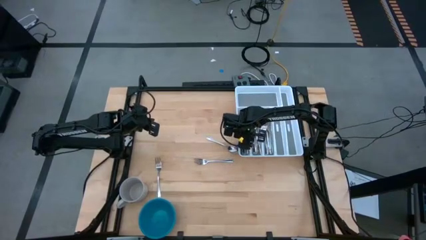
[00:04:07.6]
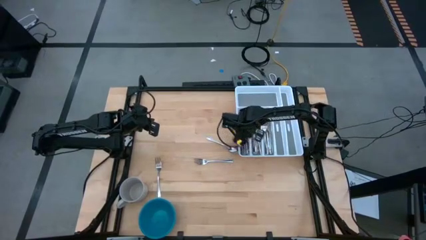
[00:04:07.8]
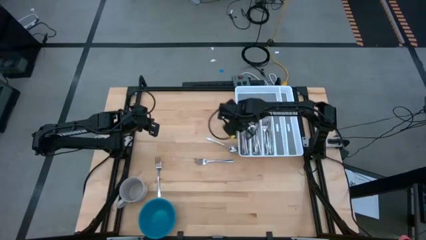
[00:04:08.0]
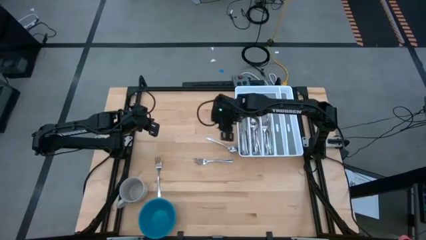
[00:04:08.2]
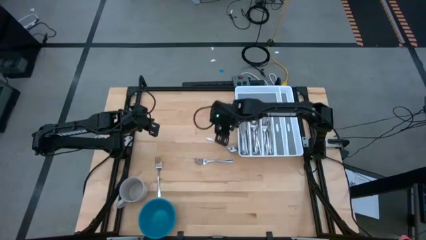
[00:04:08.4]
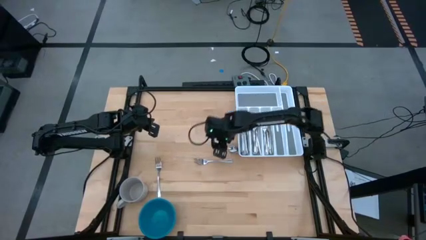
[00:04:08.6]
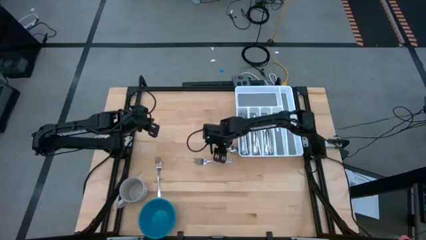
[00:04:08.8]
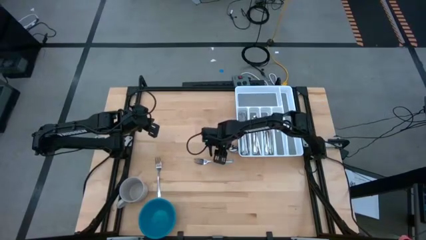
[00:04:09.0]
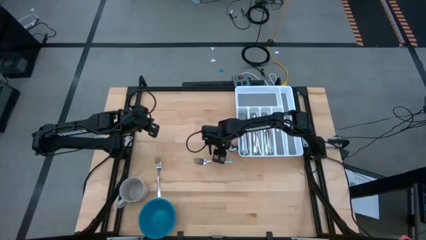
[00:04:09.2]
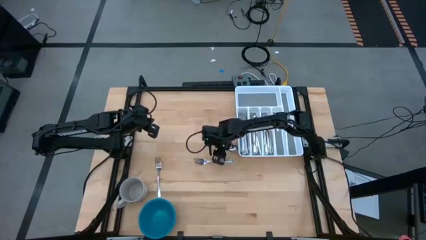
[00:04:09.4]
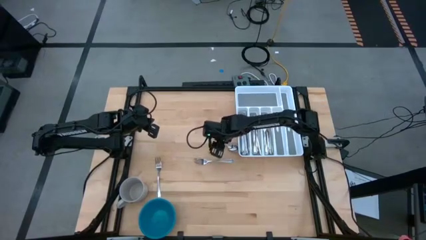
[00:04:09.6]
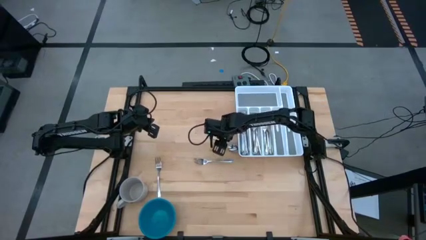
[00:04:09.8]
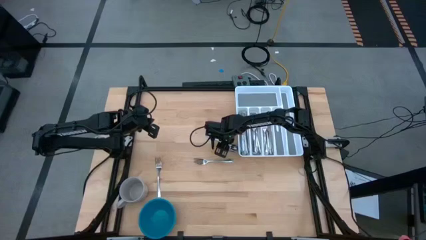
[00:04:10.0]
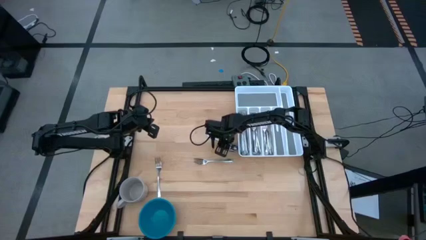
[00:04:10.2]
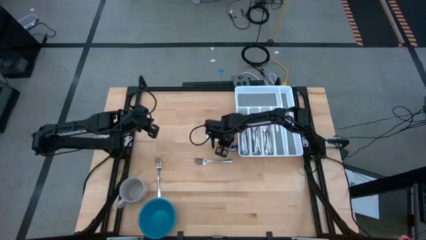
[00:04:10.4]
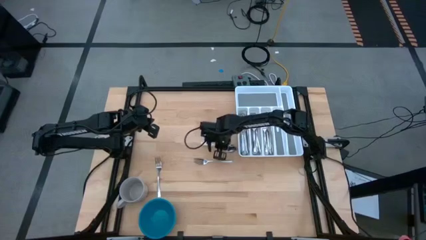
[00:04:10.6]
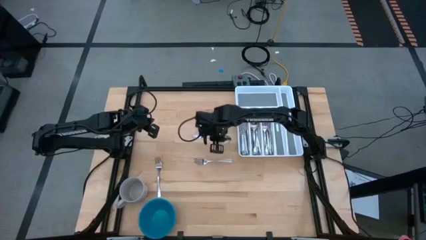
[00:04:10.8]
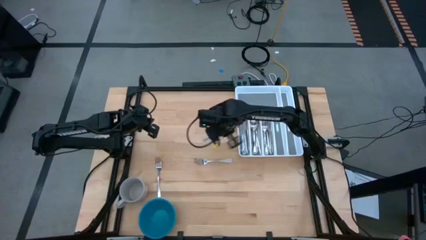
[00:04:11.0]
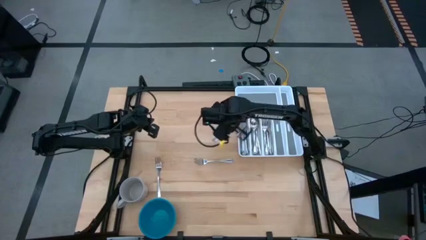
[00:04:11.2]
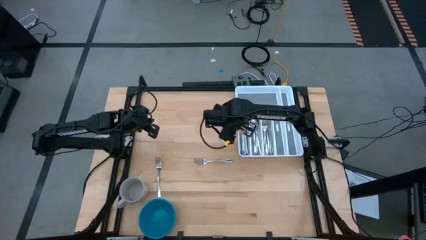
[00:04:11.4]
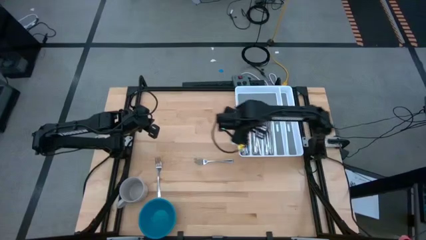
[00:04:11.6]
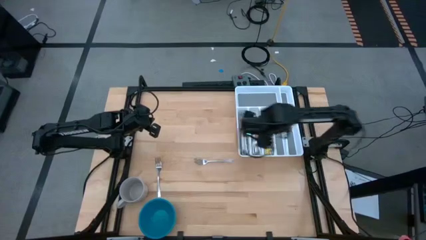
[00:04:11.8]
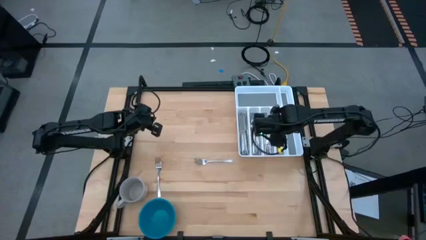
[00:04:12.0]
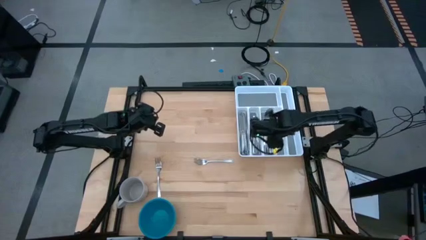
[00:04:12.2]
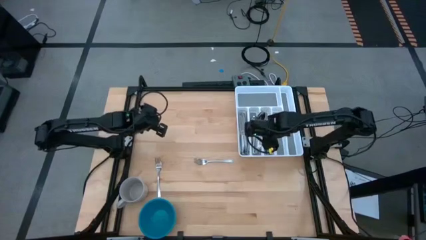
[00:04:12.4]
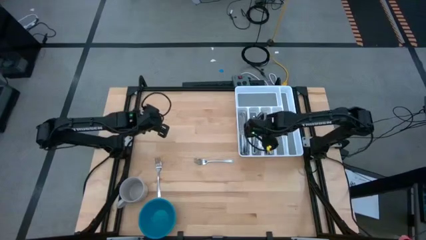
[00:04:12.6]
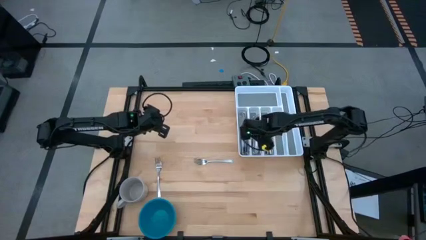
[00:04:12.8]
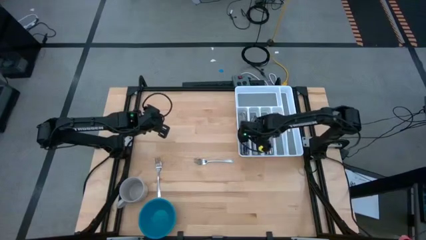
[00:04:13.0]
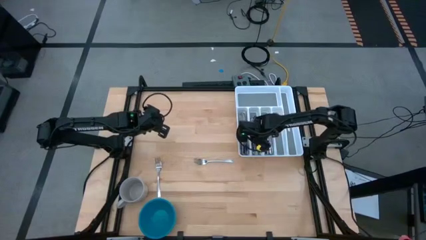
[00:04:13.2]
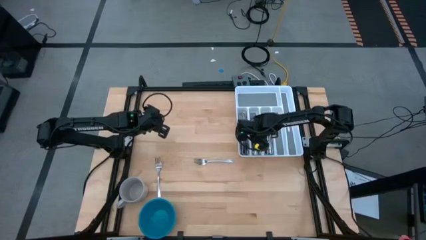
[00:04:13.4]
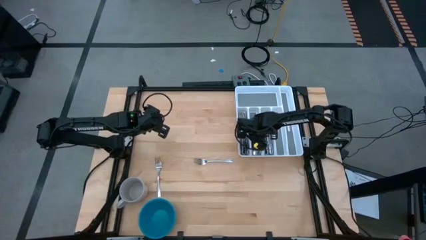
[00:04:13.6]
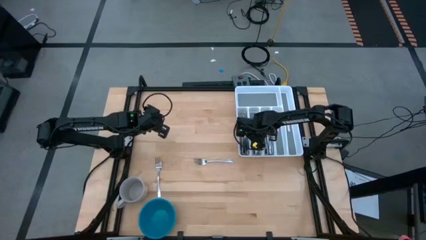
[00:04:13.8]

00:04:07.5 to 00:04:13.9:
Task: Sort silverware
Put the spoon into the silverware tray

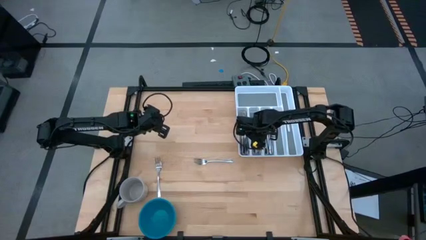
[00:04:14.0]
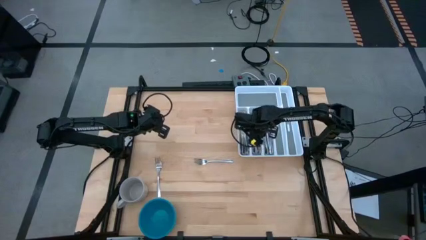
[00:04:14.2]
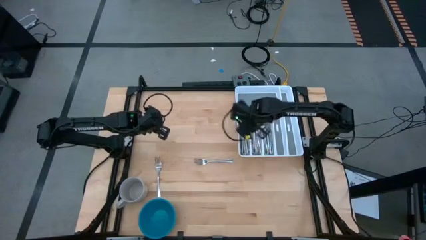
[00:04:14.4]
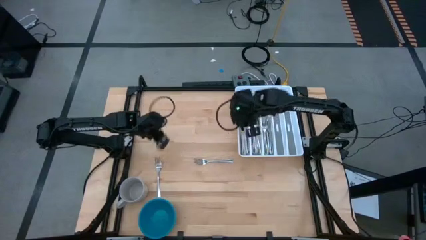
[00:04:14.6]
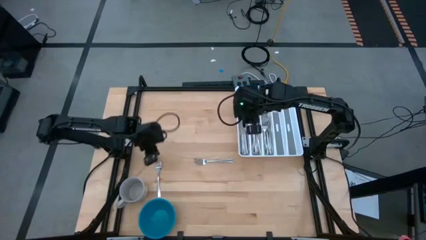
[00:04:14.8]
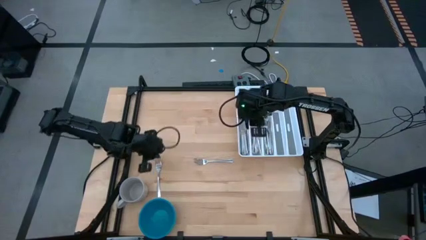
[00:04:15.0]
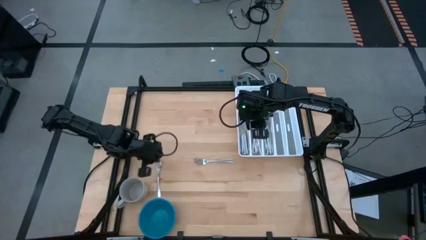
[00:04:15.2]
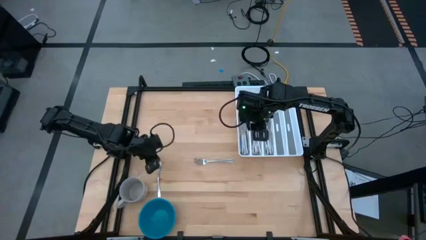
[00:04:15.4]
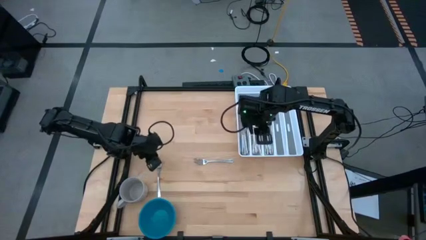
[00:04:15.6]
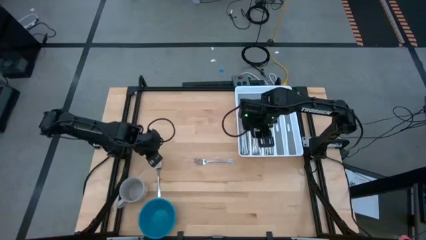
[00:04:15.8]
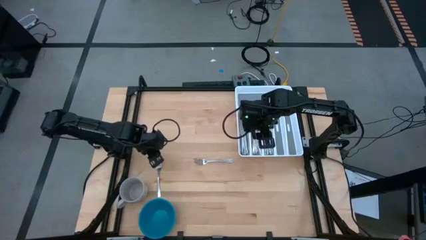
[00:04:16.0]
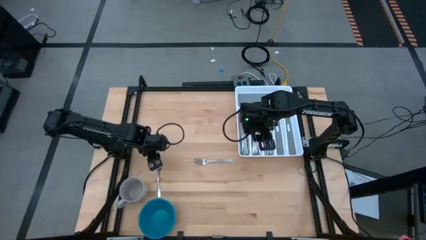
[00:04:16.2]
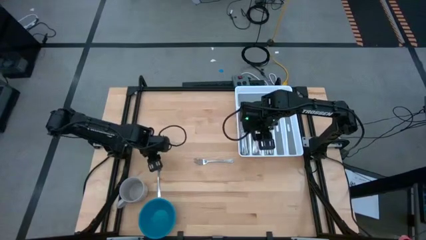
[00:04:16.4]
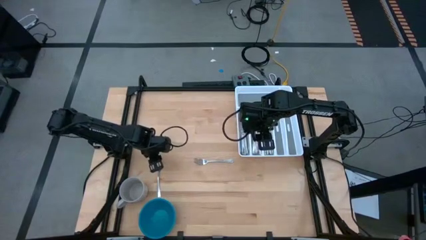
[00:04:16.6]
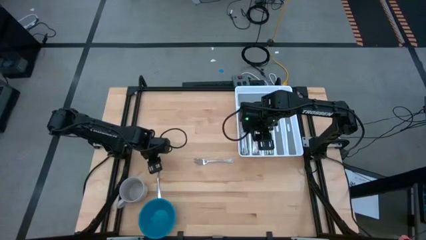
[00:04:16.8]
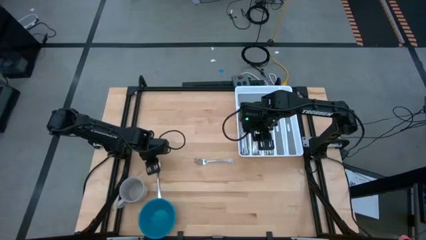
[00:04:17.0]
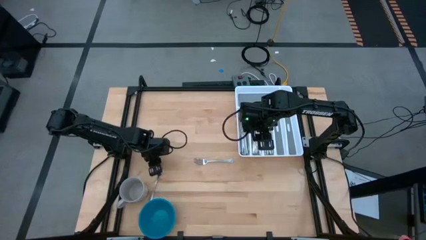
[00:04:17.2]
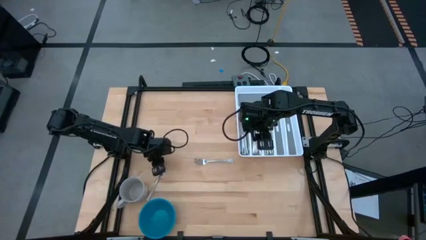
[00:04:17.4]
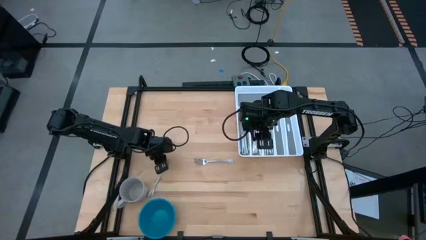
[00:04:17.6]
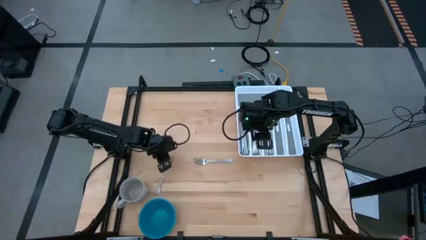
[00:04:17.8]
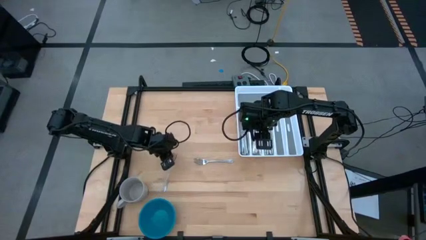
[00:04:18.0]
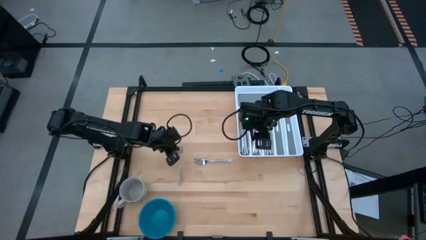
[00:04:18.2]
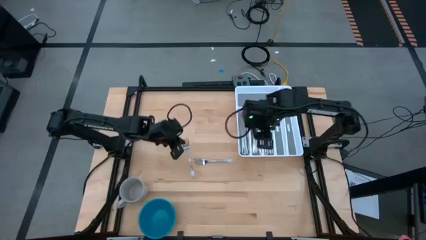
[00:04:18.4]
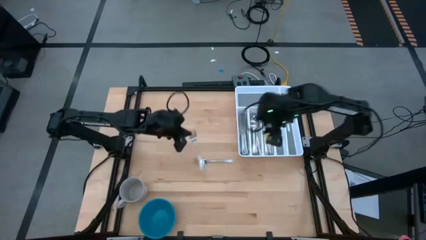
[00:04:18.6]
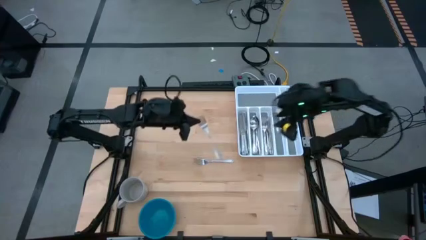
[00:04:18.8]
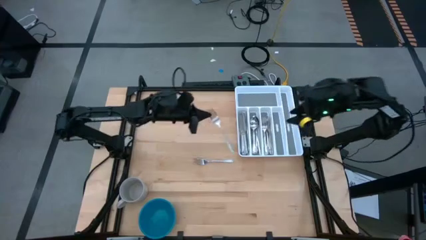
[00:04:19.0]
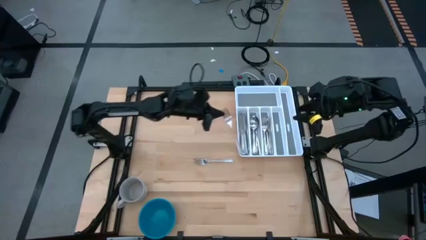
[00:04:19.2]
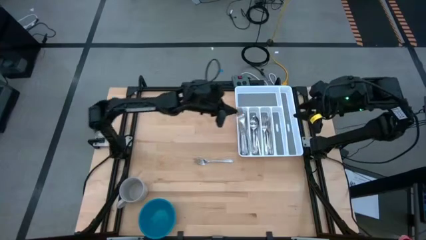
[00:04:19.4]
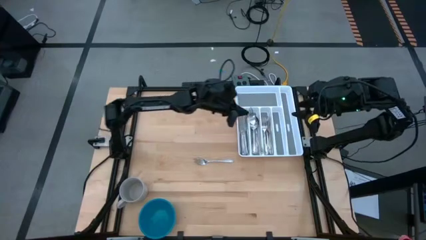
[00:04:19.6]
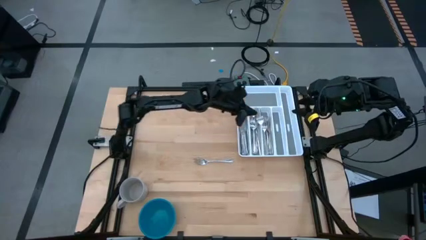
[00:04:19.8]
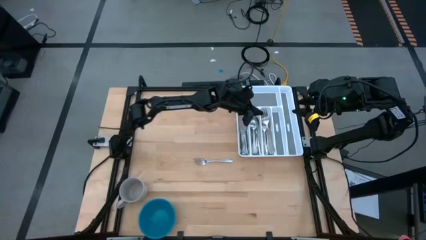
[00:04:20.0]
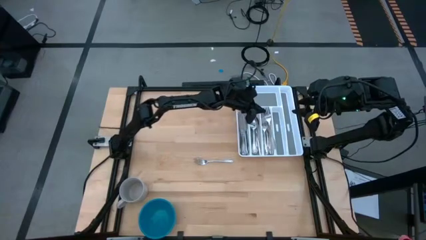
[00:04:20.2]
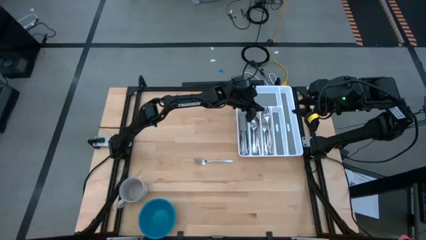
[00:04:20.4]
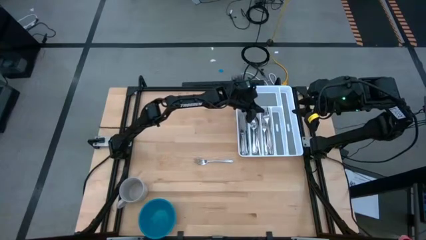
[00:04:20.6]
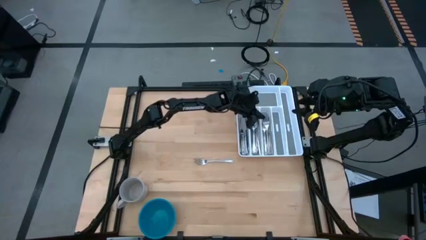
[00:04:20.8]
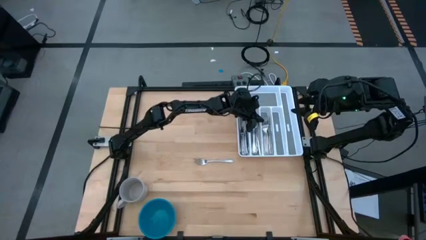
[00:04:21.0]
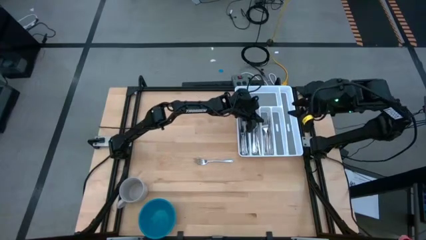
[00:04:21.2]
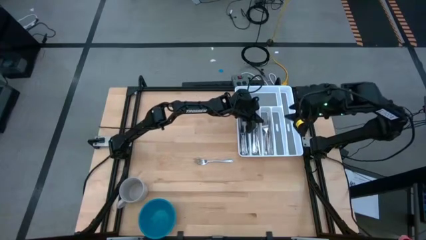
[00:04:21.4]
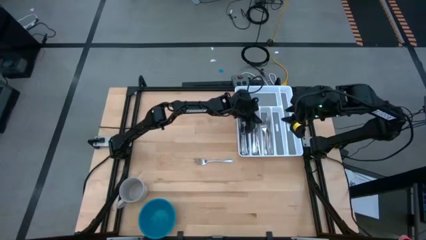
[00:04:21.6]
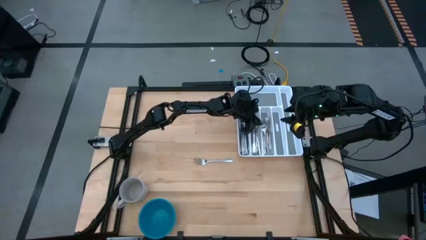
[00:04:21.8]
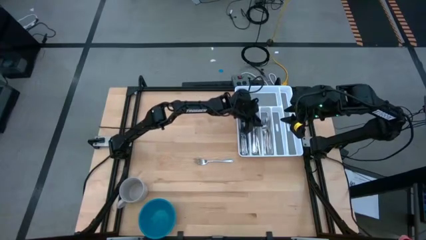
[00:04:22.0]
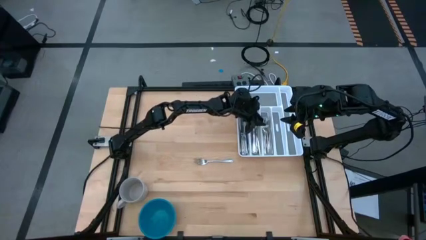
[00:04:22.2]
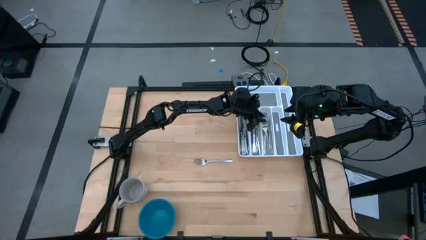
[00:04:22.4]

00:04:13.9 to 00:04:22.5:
Put the fork into the silverware tray
